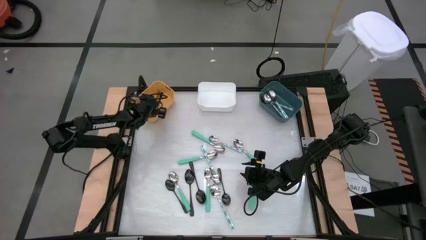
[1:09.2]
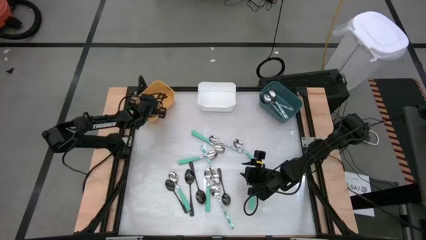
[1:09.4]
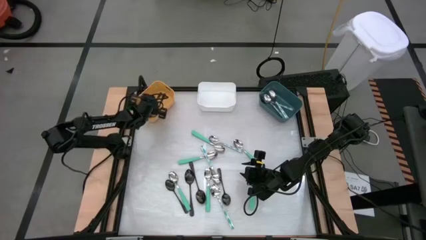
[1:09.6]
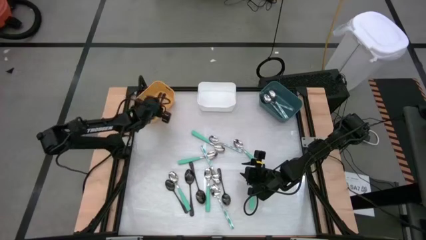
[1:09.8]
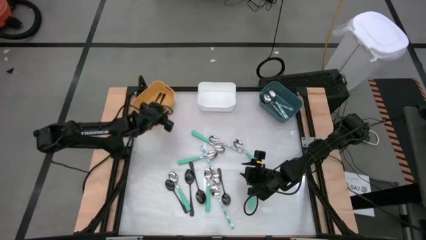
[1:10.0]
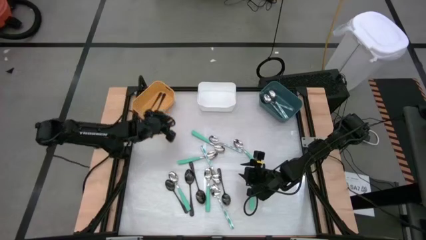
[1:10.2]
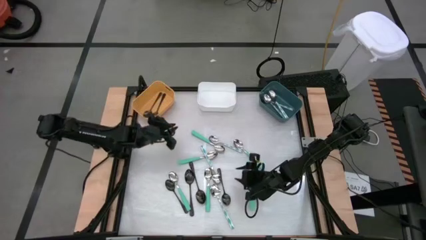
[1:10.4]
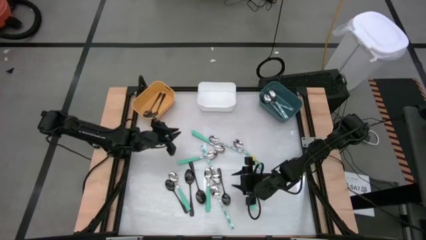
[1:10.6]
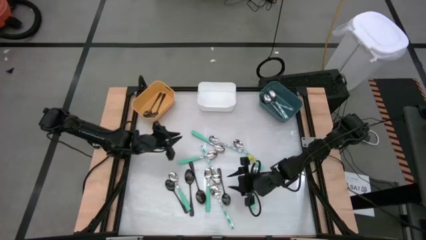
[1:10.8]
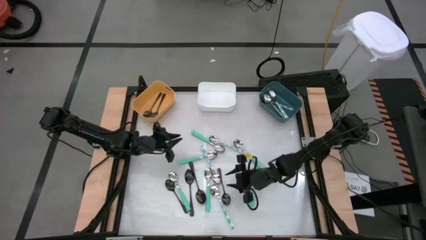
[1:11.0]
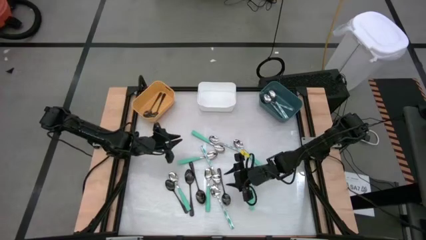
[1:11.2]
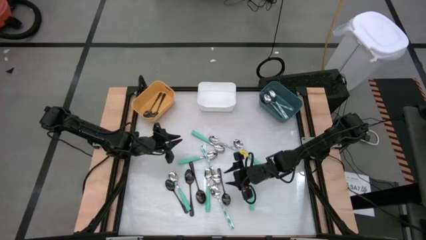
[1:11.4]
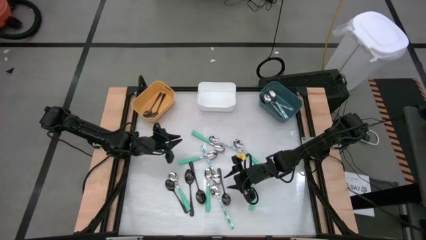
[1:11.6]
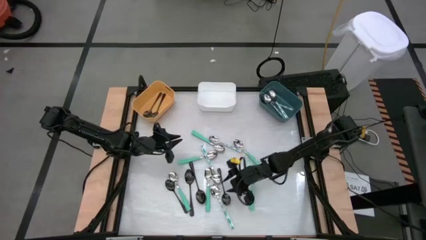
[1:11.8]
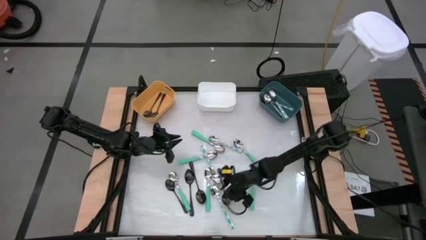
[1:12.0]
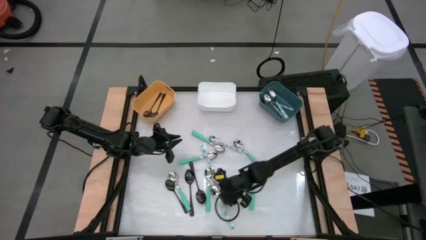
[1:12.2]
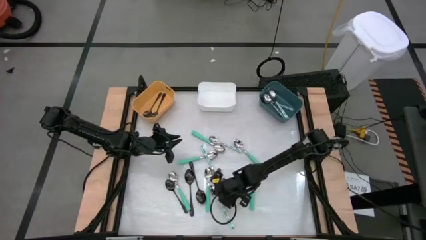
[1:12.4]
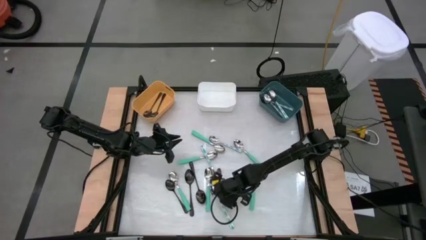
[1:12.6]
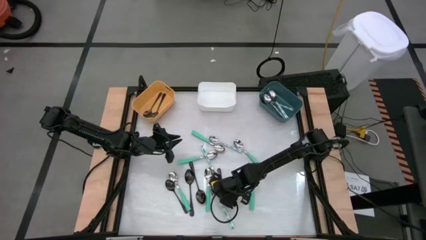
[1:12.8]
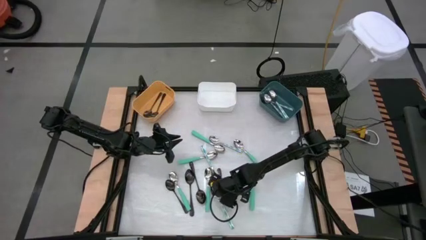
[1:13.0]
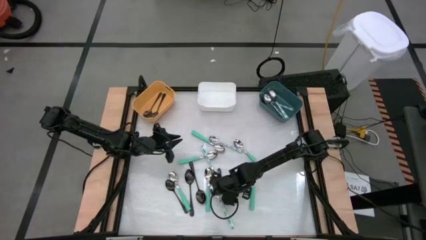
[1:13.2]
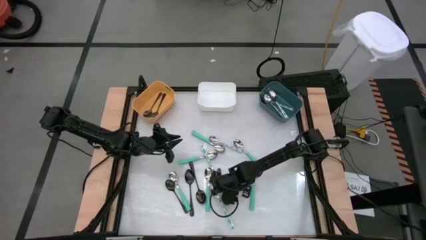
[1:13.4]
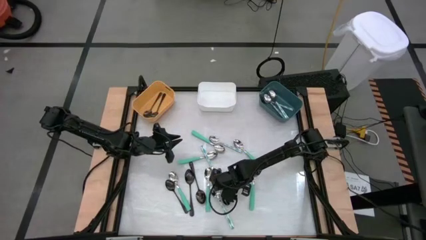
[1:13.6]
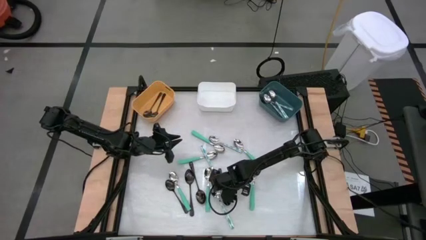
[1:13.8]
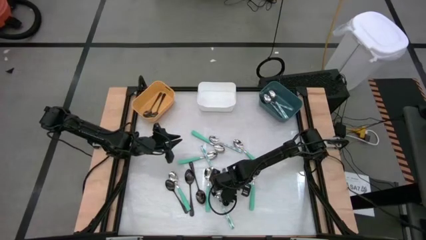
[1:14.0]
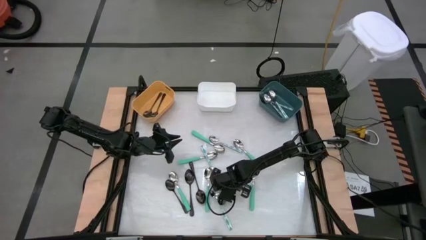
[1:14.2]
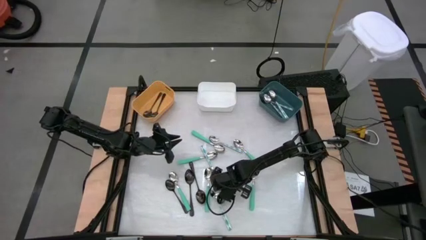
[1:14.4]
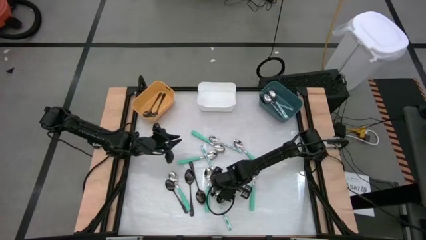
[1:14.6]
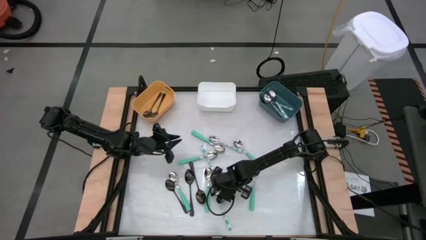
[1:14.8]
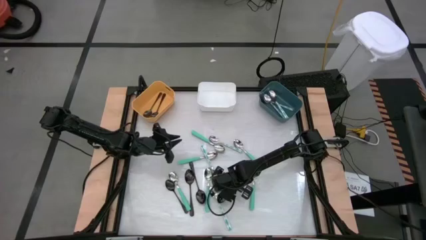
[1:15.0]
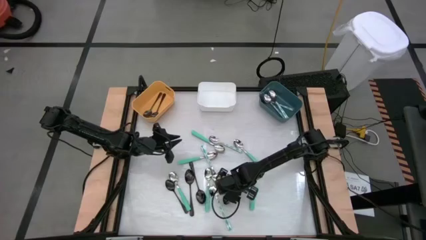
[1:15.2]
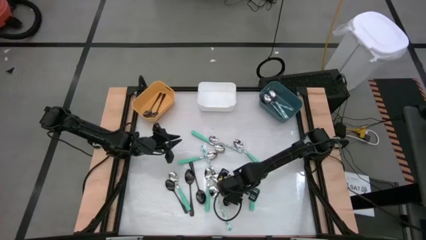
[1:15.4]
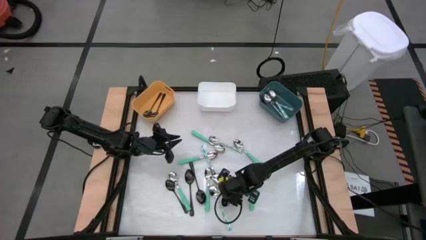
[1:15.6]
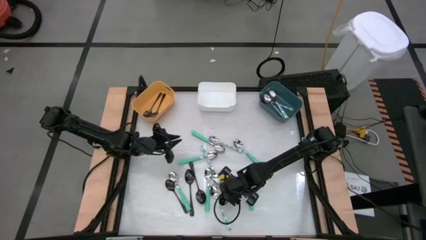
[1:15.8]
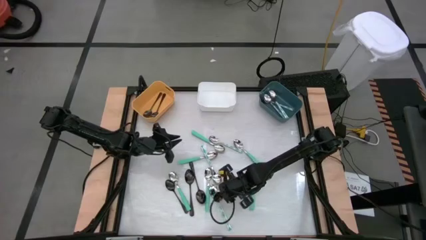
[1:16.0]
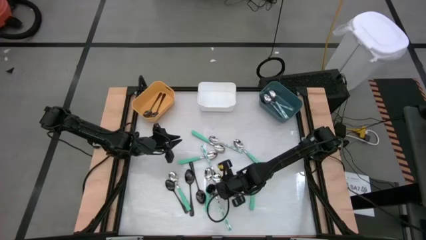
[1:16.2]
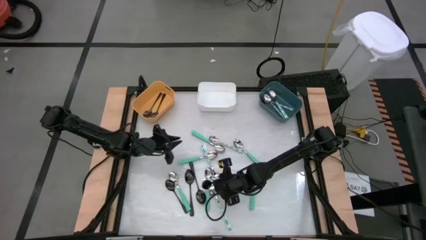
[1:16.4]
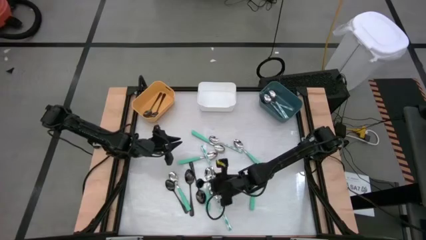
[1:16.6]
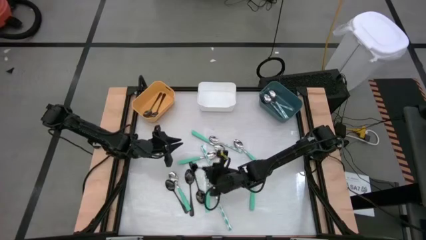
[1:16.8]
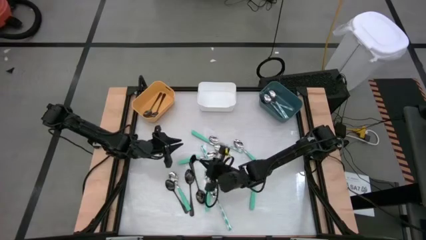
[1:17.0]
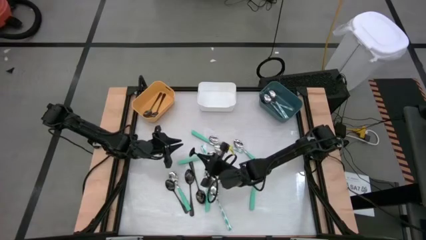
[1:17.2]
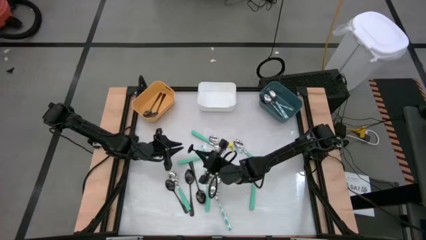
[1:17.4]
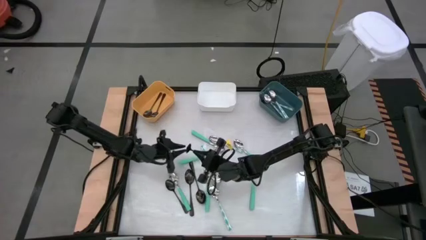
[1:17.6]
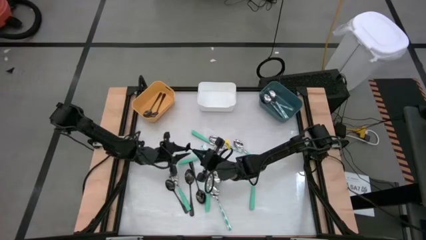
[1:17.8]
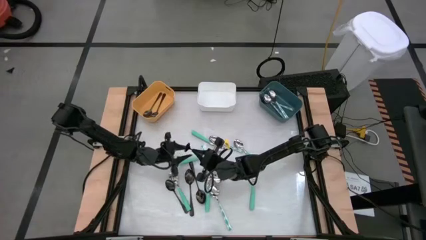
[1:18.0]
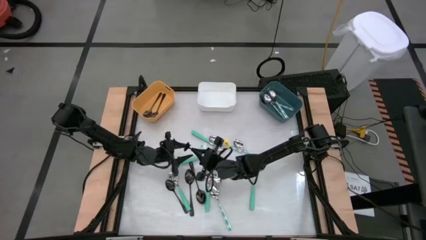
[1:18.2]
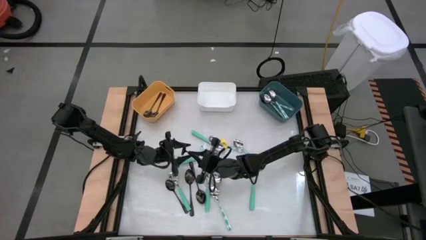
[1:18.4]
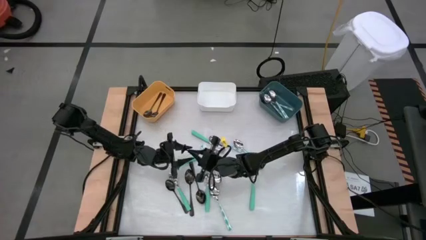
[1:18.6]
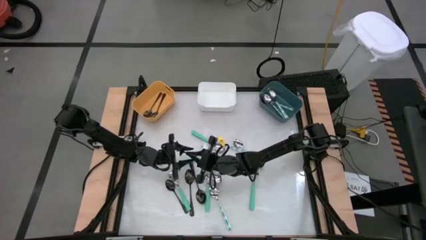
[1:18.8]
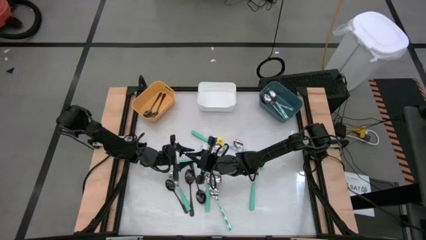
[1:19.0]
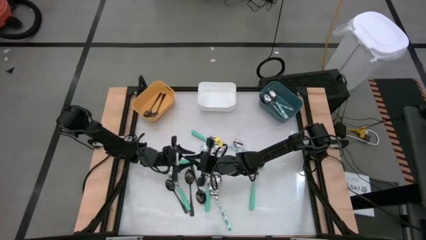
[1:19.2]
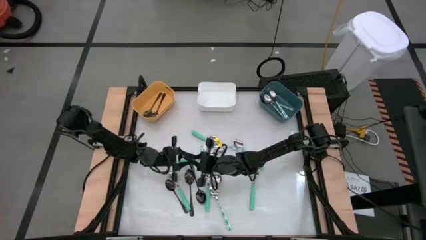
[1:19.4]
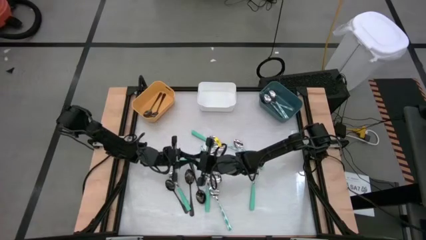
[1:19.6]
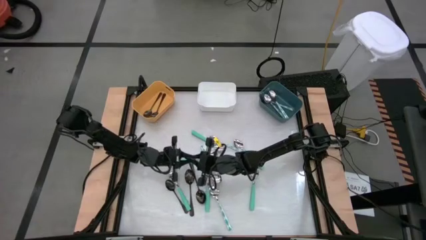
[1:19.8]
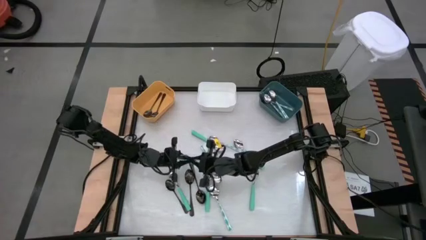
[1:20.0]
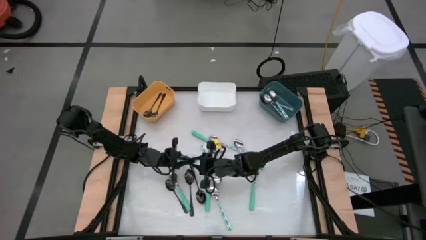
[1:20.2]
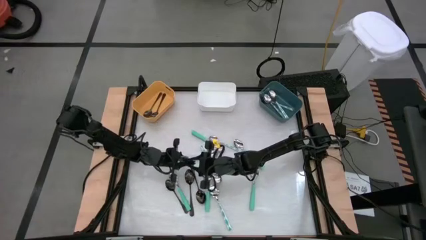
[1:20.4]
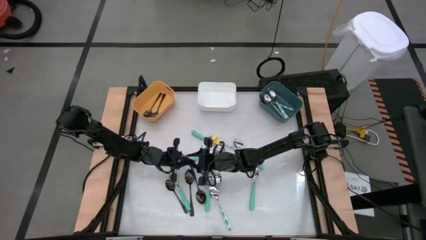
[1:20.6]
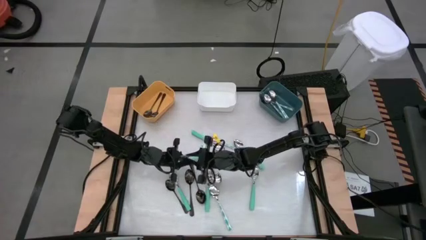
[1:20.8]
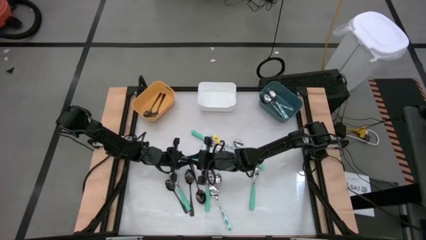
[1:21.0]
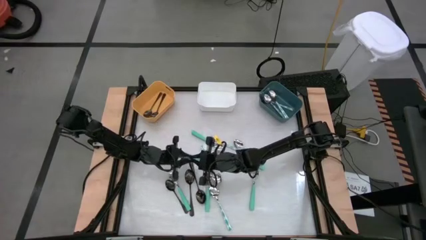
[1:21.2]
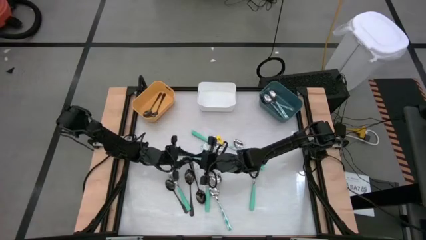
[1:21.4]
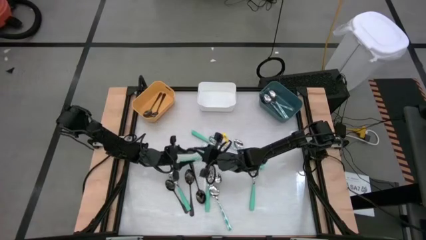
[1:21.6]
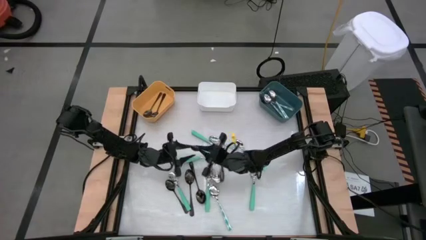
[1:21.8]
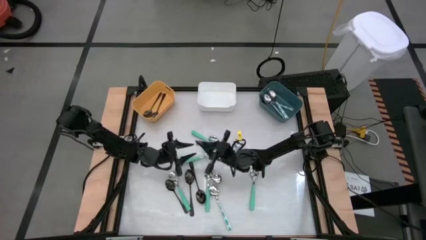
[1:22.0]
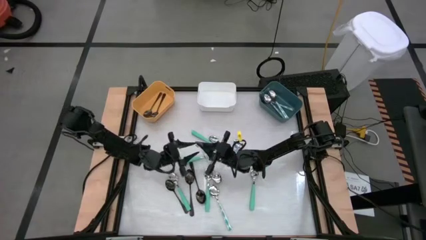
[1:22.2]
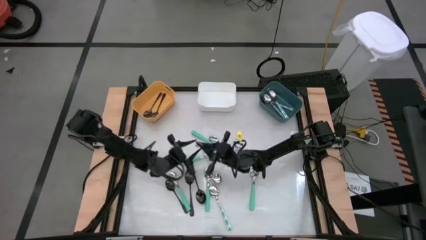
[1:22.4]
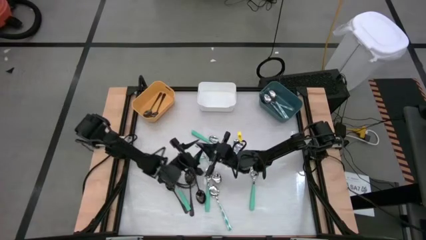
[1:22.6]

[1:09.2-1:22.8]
Task: Sort silverware by color (type)
Put the black spoon into the orange bin

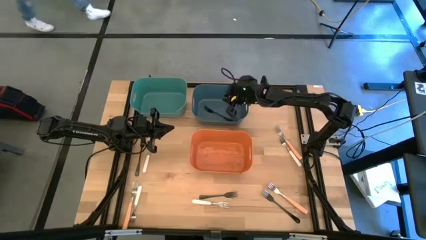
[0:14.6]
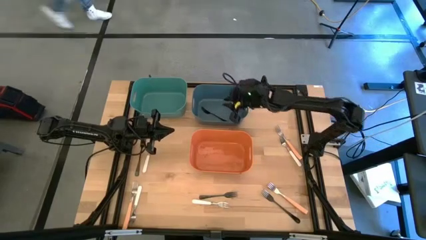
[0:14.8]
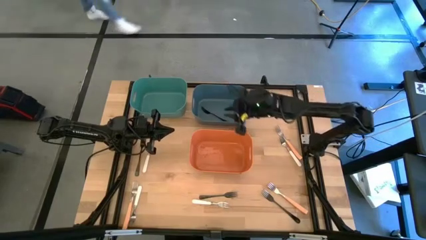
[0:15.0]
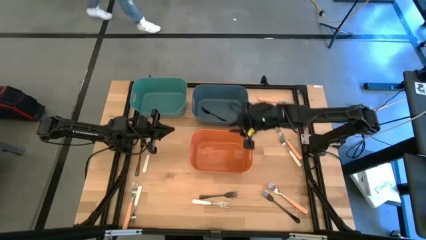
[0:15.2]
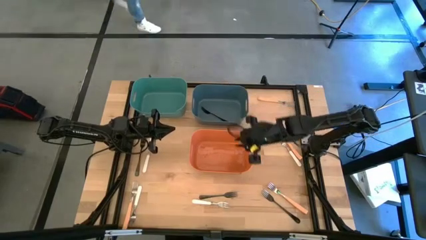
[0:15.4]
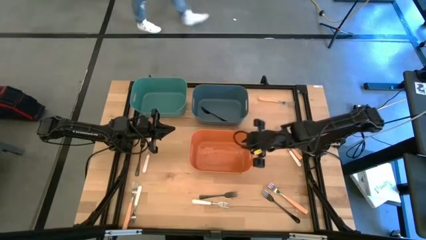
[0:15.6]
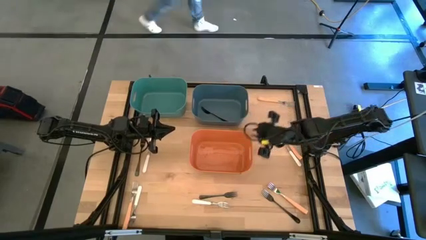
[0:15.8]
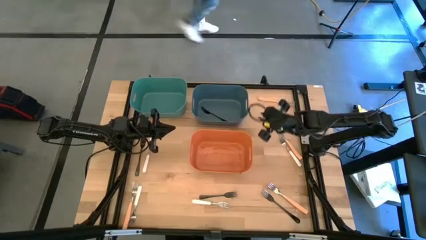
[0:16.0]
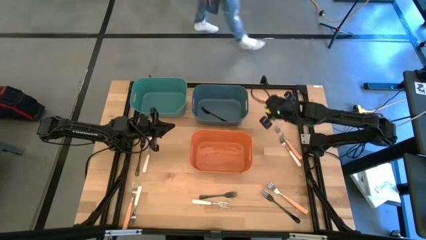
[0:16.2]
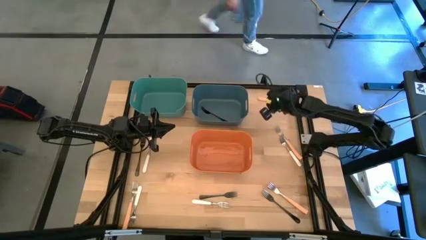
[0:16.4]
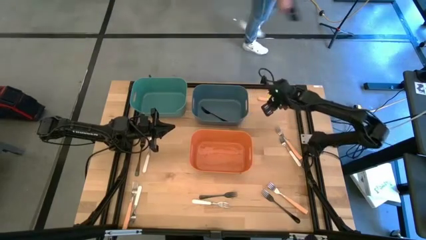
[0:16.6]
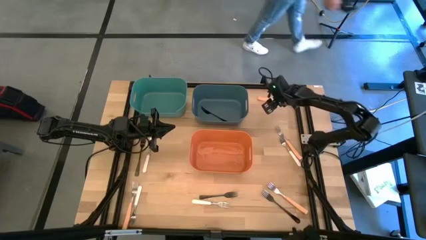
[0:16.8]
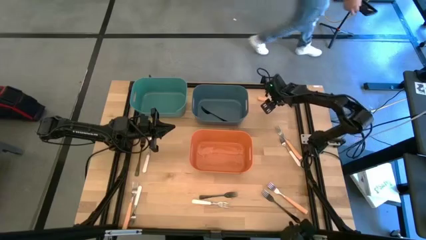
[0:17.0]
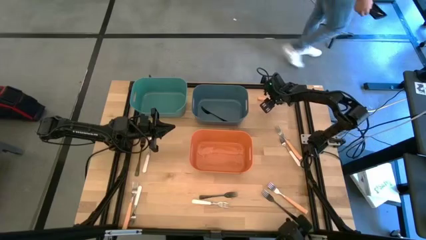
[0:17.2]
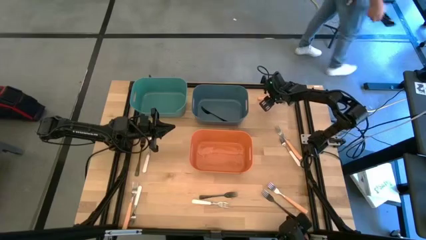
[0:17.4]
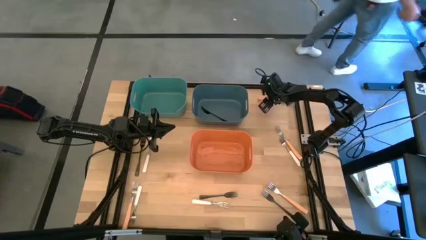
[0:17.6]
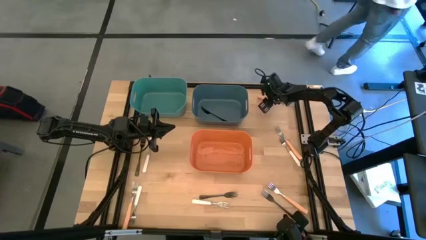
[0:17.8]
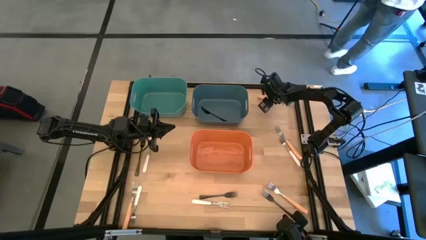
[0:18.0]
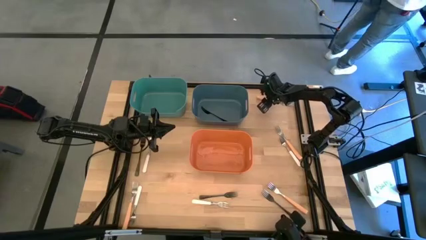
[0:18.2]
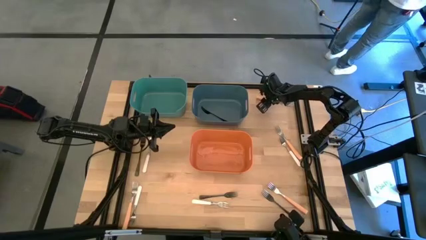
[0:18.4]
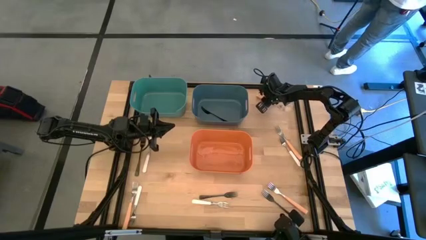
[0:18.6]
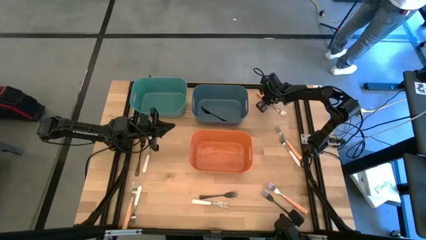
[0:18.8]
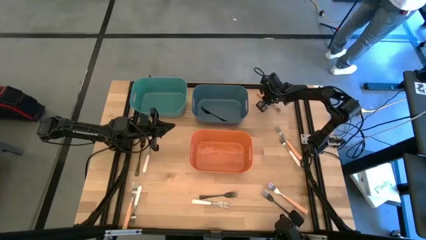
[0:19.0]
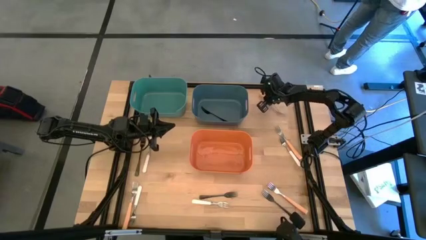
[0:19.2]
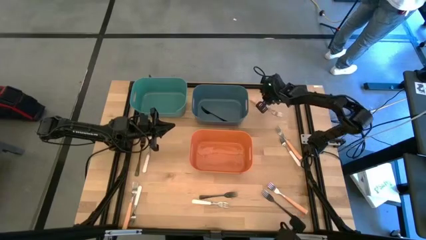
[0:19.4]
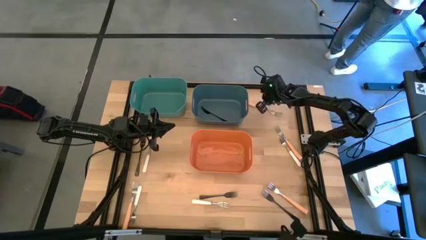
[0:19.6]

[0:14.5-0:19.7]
Task: Sort silverware by color (type)
Put the orange fork into the orange bin
